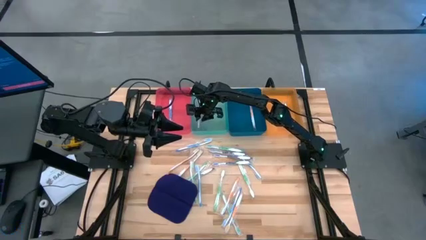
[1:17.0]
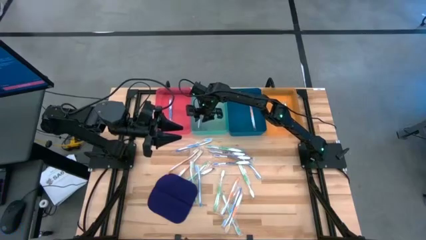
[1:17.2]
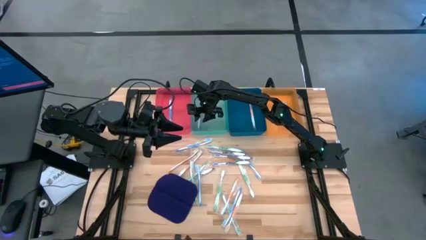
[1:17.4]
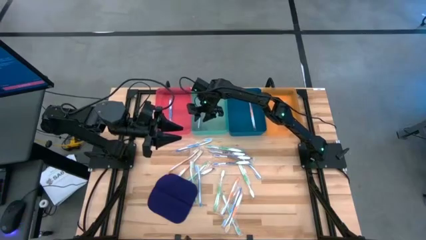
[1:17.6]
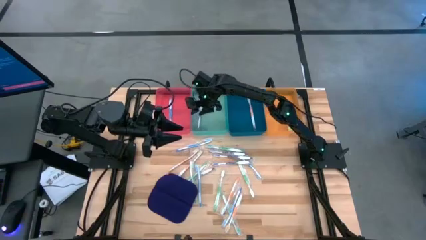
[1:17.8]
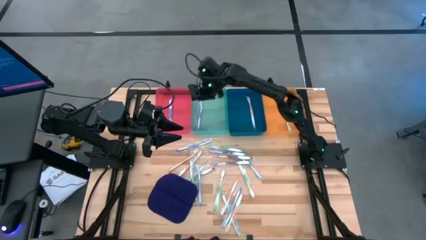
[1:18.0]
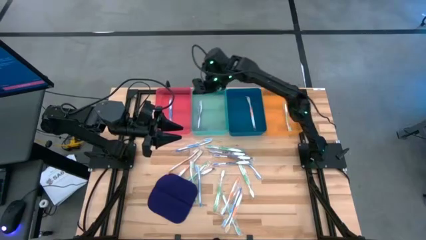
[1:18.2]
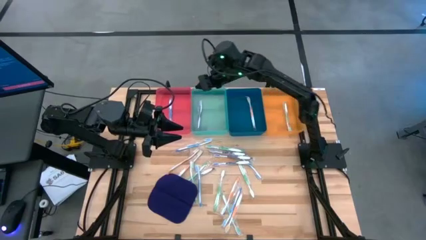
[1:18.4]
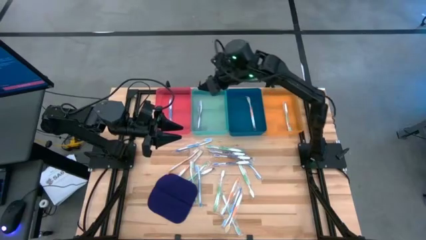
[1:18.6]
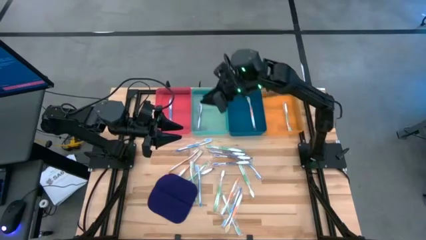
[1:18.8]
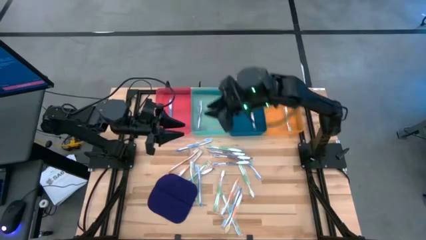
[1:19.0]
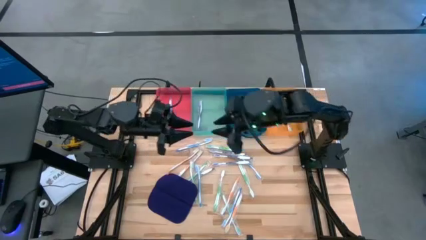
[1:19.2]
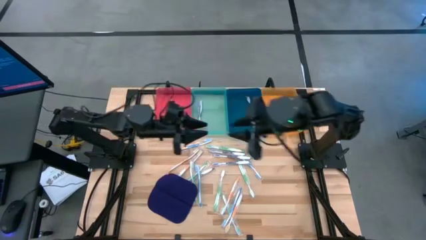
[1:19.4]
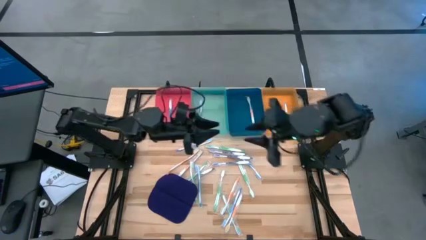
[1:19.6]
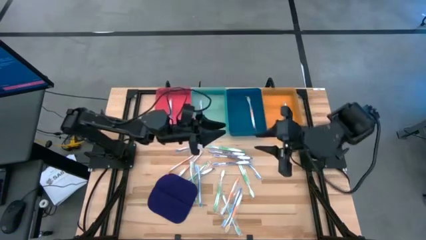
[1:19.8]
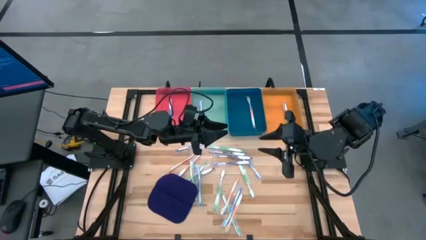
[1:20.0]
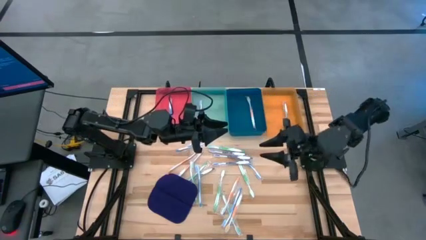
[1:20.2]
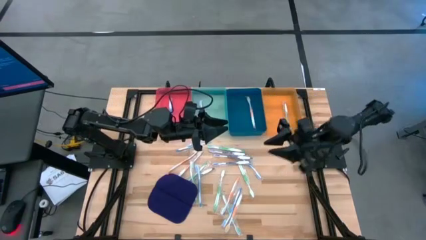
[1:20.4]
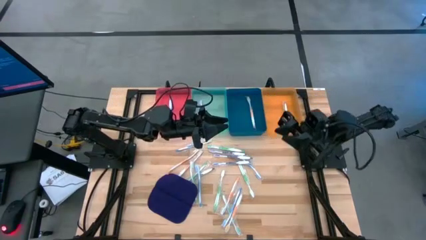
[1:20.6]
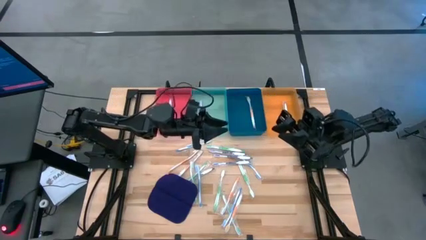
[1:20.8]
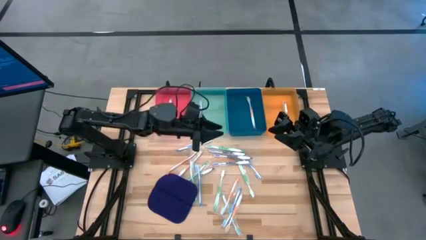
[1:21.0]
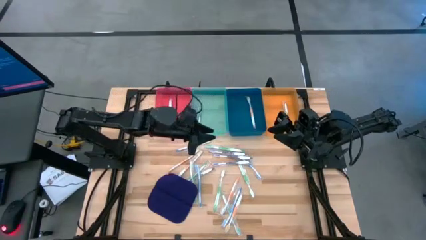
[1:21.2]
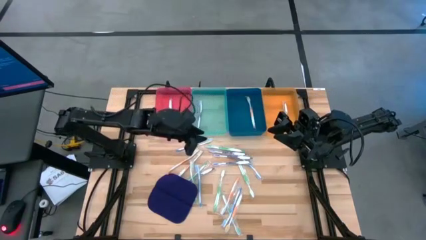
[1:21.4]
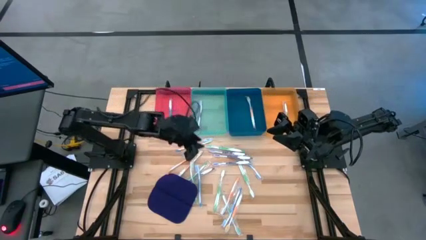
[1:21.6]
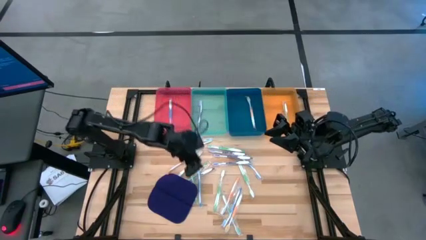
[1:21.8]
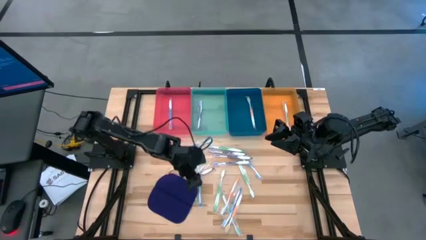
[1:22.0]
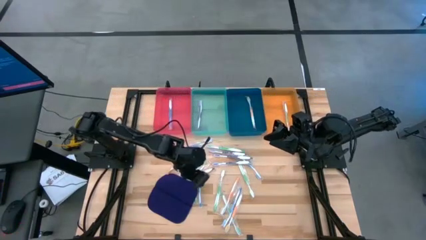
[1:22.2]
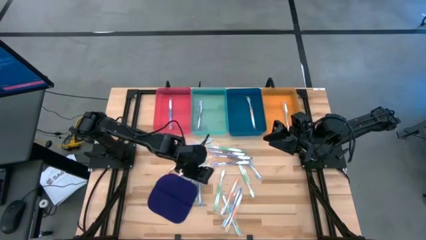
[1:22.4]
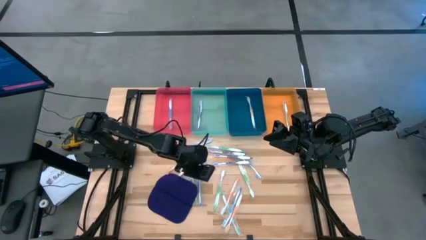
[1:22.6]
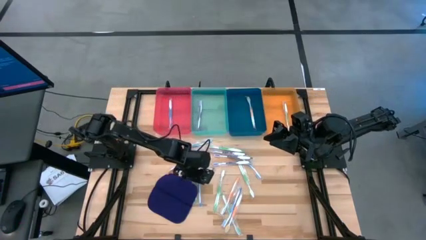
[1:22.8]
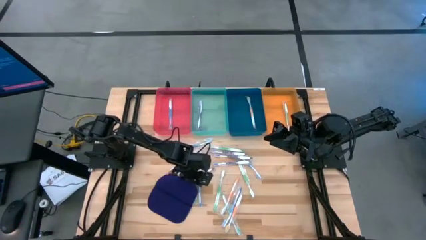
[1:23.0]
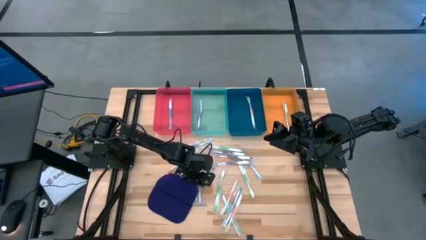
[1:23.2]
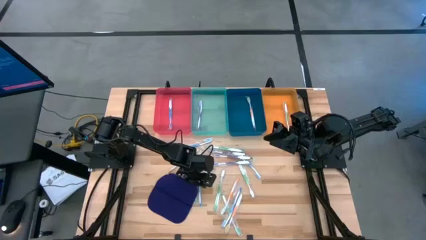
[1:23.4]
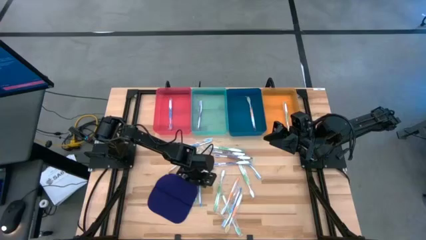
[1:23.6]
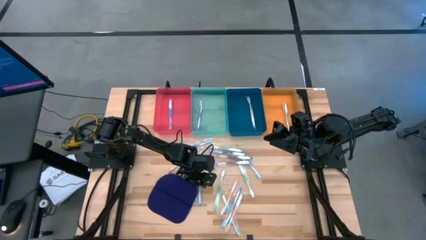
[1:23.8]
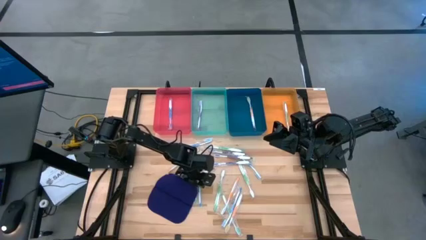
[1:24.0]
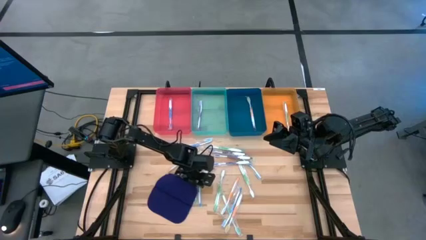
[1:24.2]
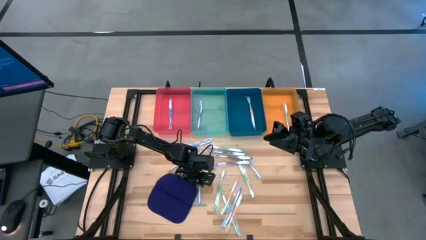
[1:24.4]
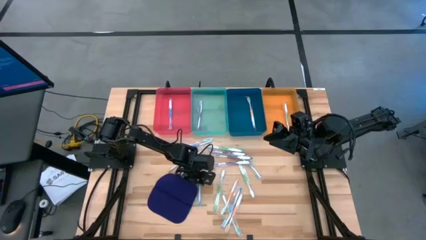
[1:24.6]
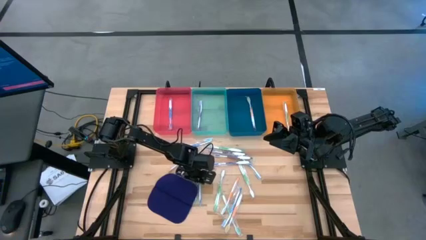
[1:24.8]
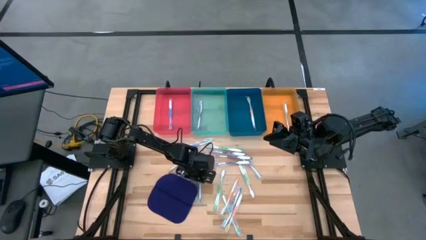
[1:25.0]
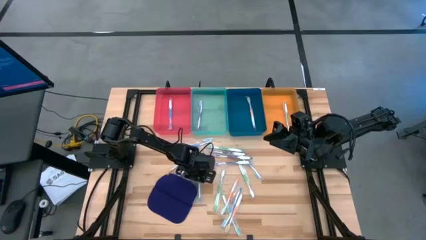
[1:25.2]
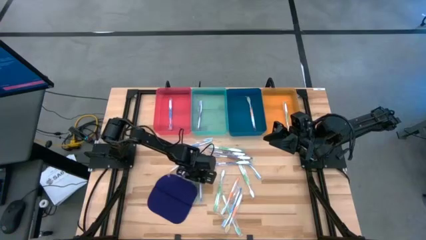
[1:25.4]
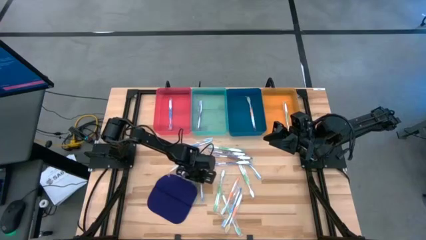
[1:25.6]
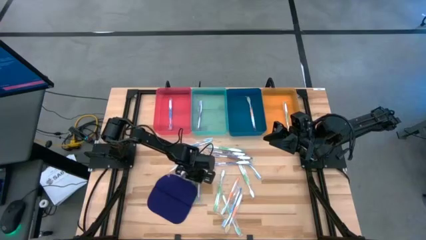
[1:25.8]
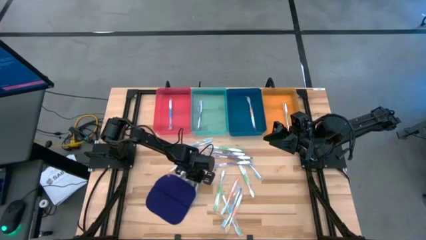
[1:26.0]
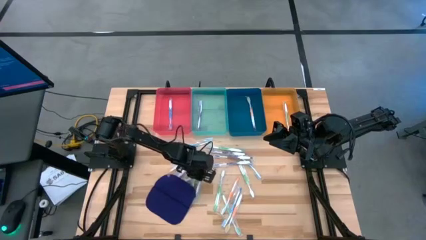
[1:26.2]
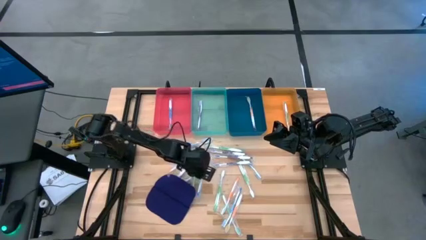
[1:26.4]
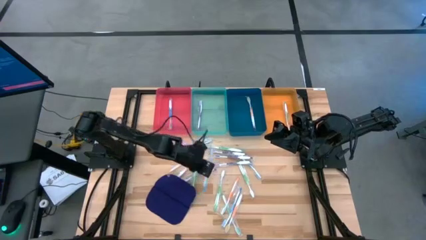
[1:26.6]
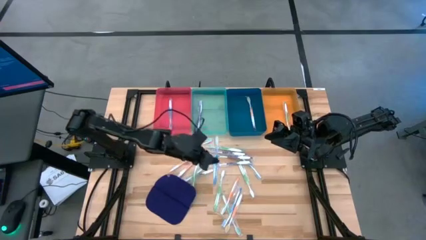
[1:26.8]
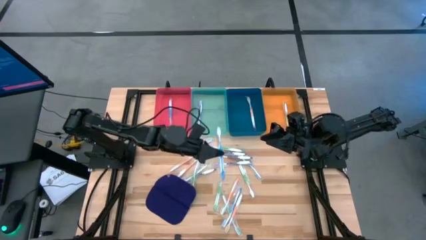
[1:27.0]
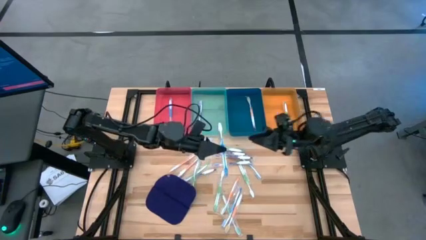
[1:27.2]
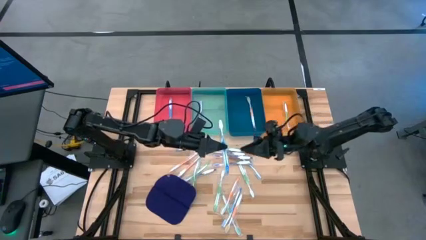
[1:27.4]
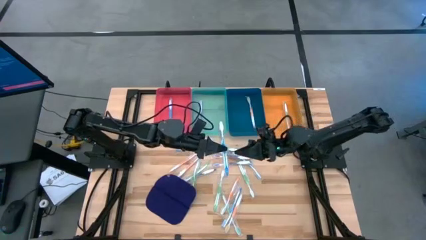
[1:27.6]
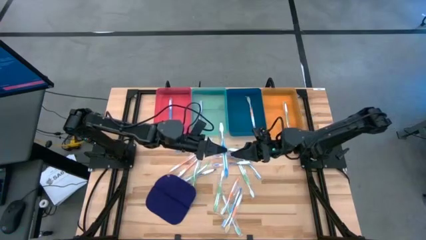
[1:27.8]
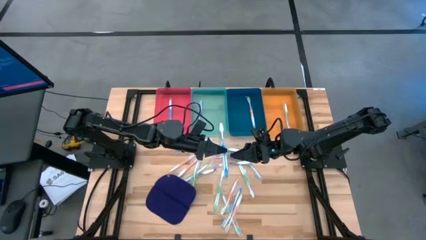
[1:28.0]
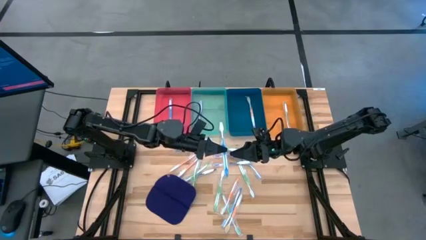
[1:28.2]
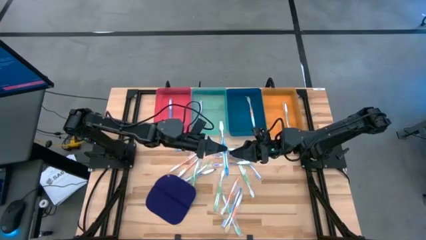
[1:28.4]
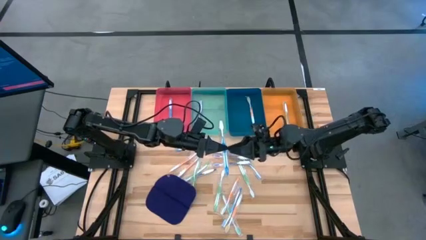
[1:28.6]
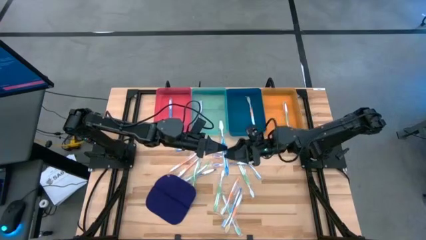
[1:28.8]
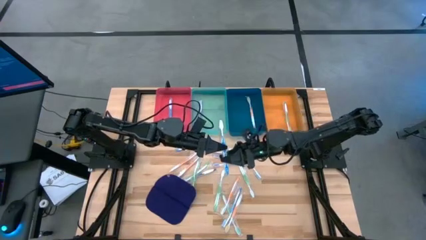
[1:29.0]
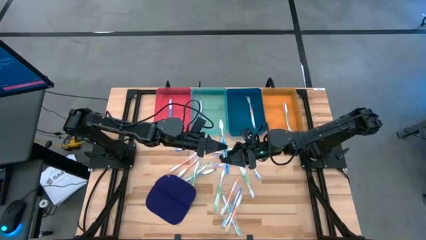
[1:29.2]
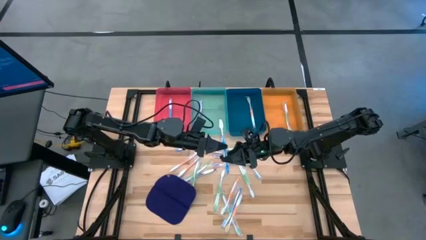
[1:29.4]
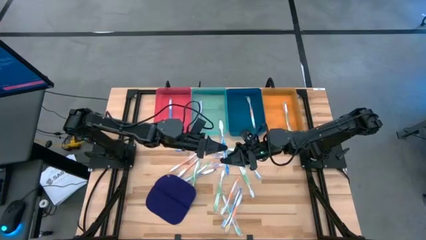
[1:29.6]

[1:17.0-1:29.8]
Task: Pick & Place Toothbrushes
Put the blue toothbrush into the red bin

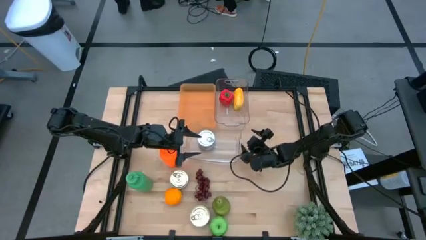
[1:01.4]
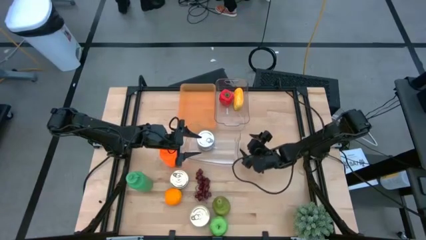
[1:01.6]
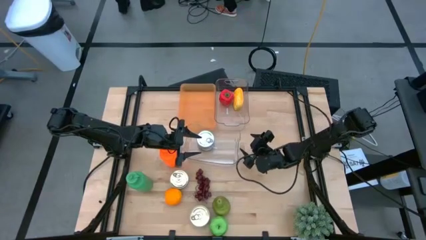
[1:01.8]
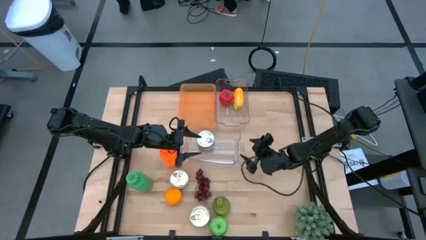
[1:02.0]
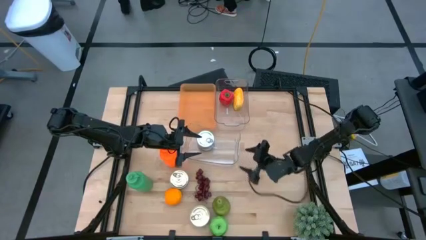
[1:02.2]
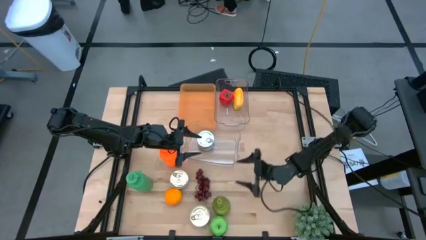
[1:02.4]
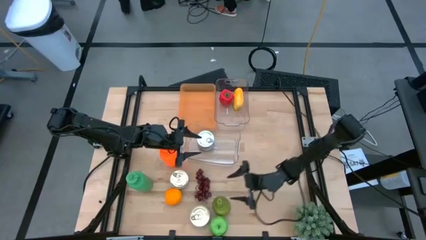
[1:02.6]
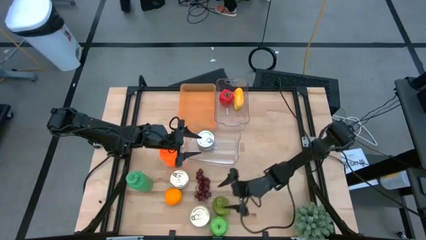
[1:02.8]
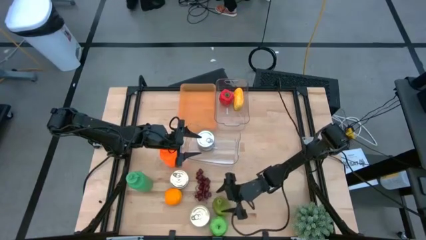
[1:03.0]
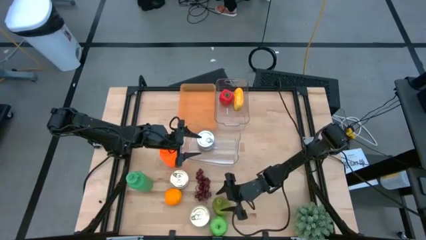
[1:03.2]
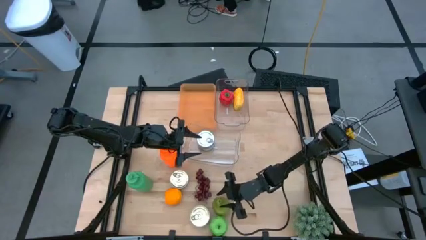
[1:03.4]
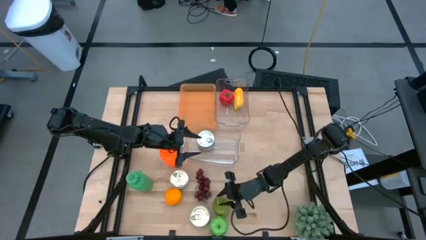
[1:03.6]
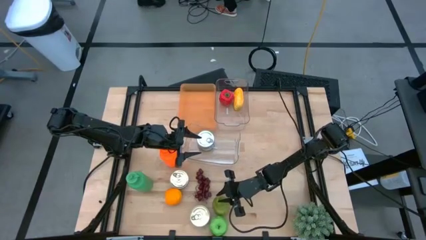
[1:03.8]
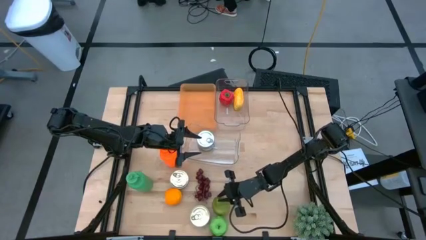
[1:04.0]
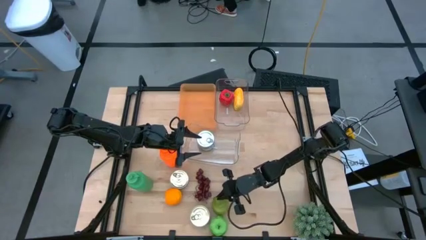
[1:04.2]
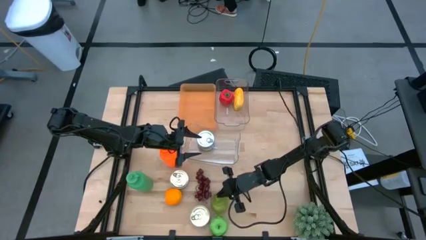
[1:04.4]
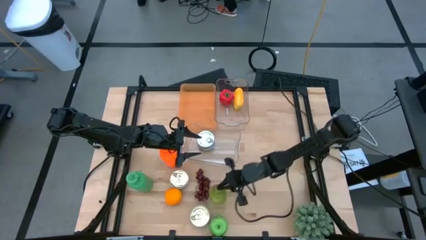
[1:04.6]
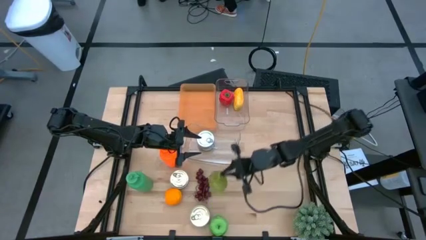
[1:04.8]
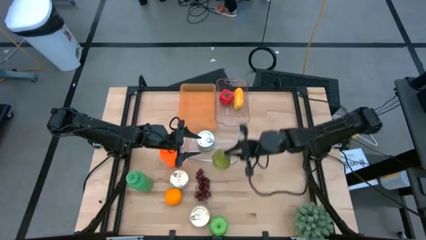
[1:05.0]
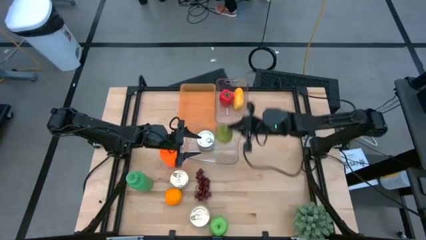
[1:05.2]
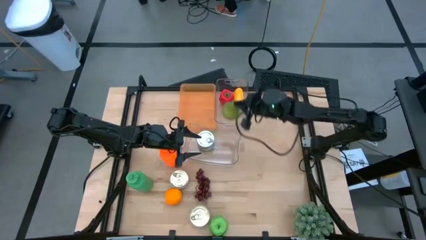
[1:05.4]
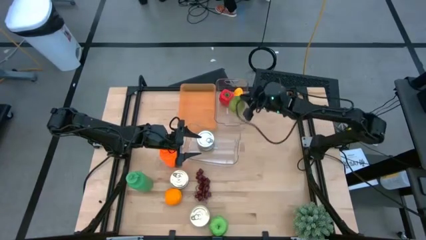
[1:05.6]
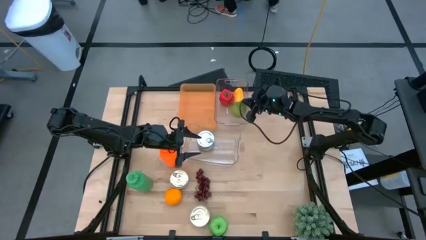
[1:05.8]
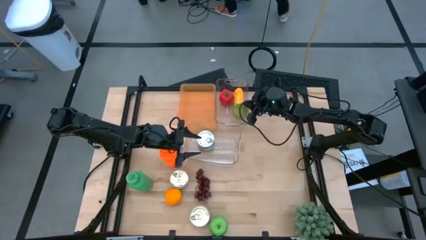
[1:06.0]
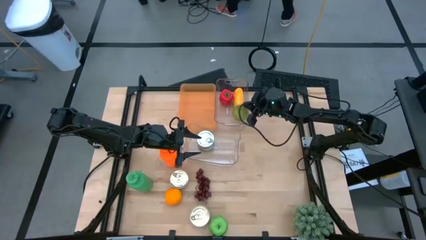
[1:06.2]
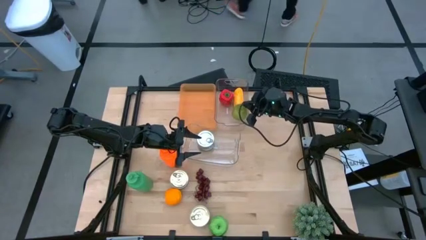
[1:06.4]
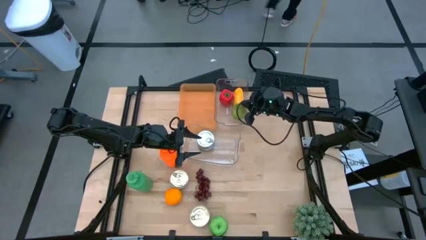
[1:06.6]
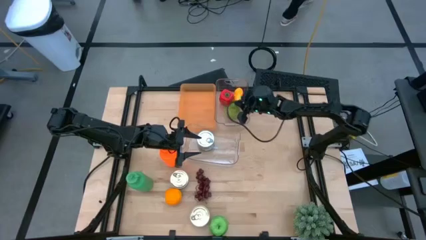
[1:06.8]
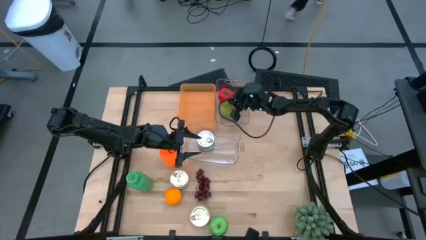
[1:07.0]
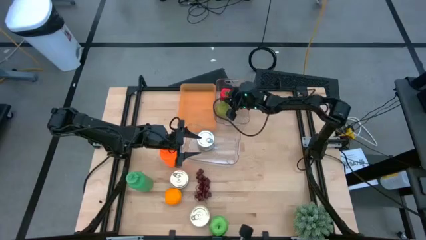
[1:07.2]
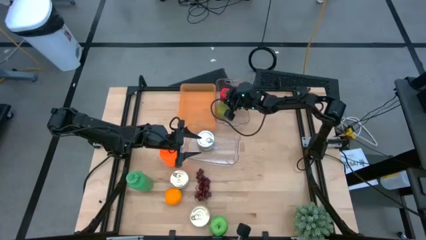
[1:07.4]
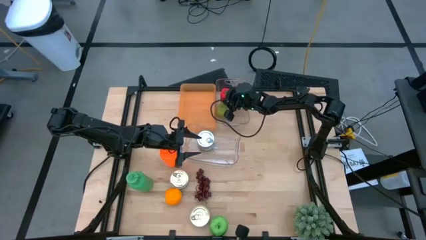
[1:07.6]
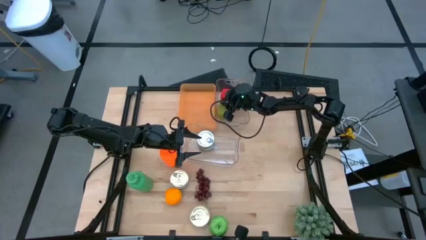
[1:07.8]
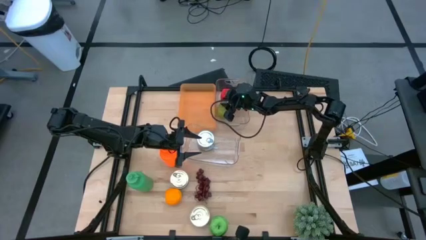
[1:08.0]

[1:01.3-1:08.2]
Task: Pick & Place Food Item
Put the pear into the top transparent bin
